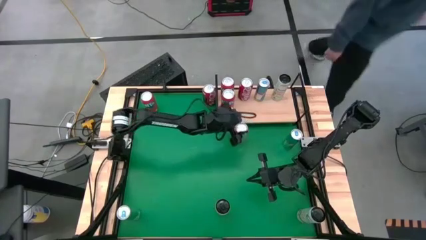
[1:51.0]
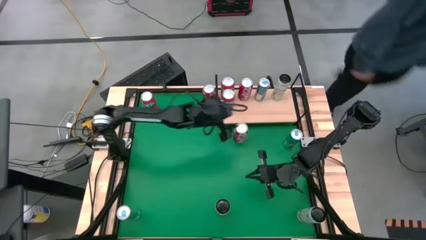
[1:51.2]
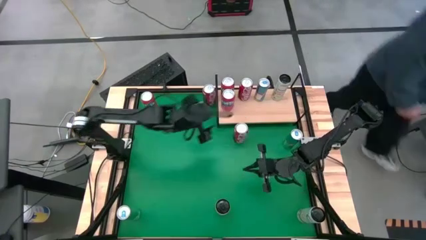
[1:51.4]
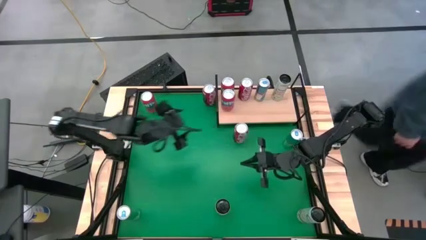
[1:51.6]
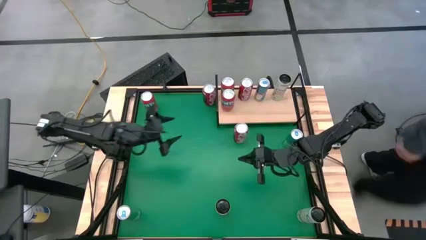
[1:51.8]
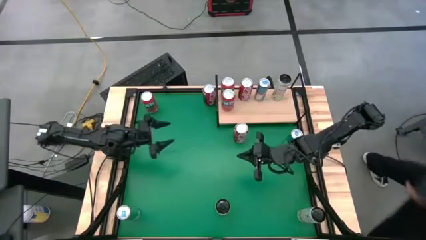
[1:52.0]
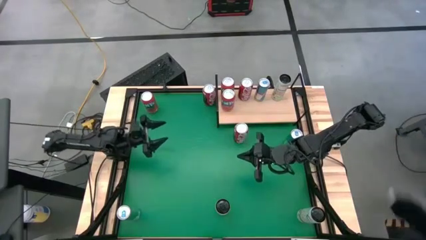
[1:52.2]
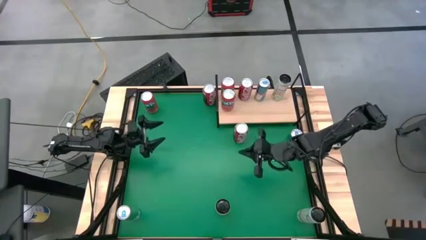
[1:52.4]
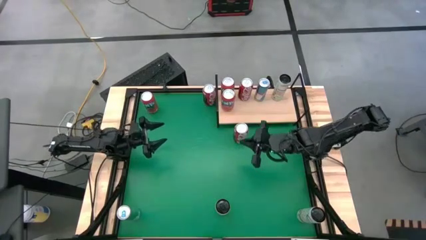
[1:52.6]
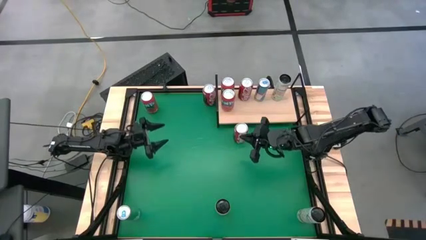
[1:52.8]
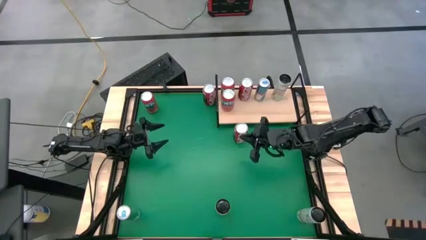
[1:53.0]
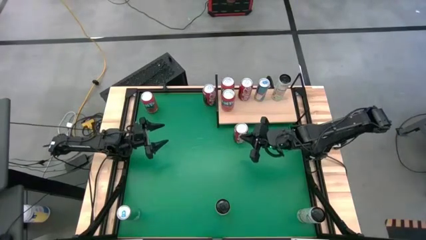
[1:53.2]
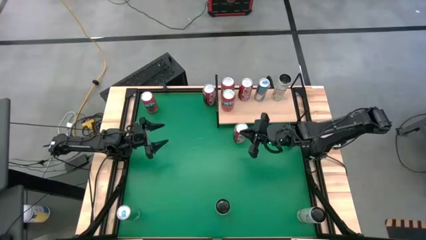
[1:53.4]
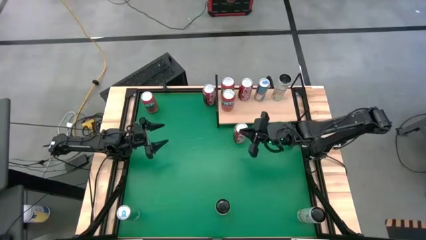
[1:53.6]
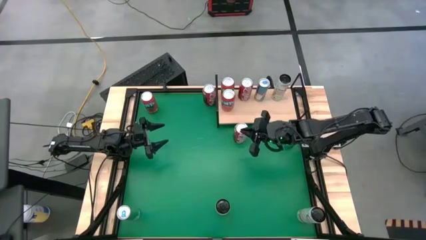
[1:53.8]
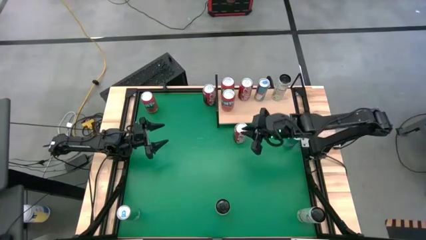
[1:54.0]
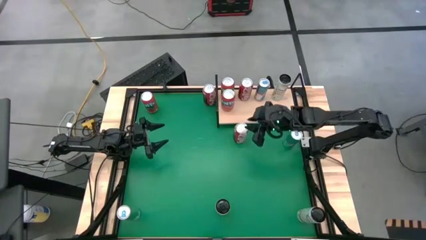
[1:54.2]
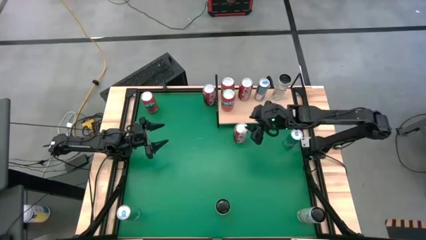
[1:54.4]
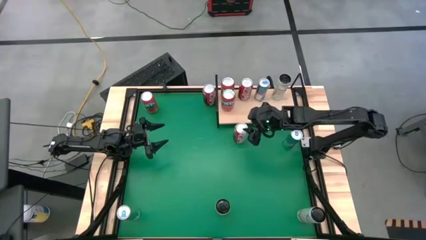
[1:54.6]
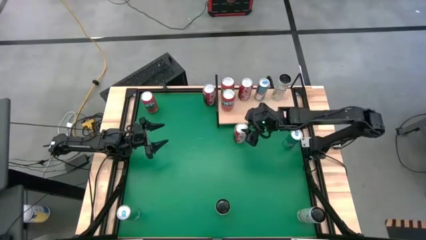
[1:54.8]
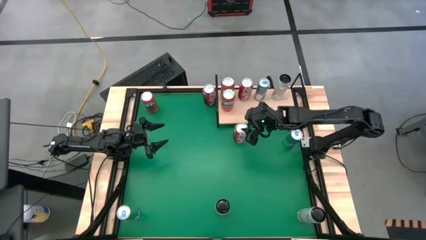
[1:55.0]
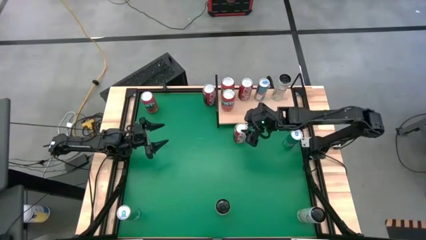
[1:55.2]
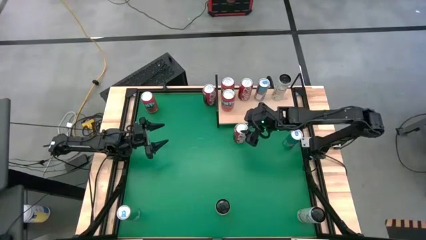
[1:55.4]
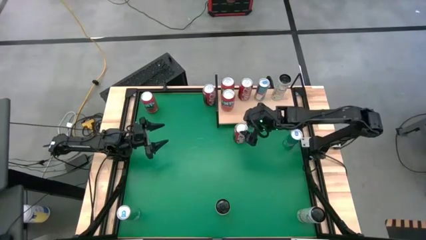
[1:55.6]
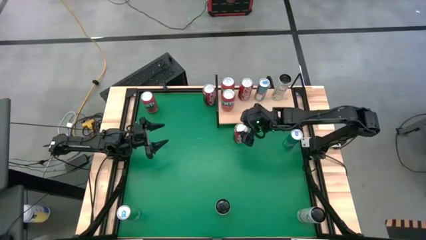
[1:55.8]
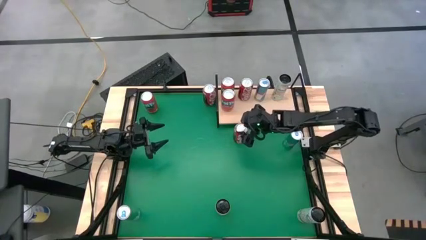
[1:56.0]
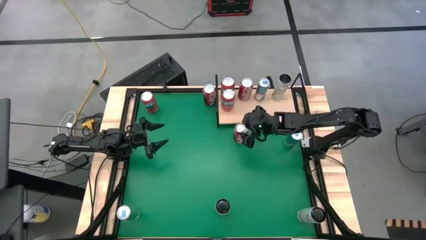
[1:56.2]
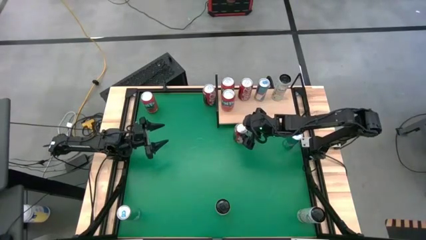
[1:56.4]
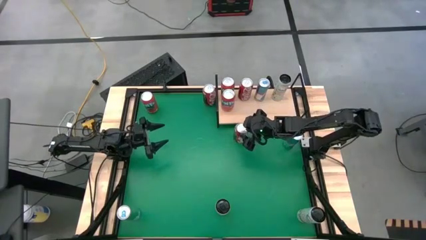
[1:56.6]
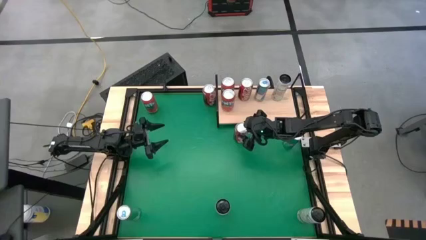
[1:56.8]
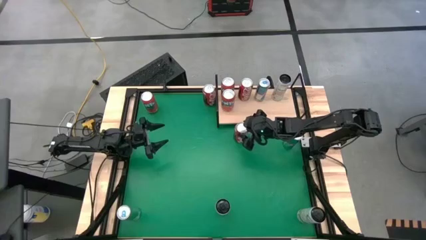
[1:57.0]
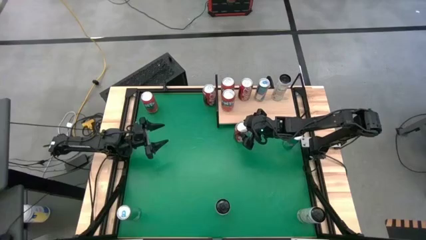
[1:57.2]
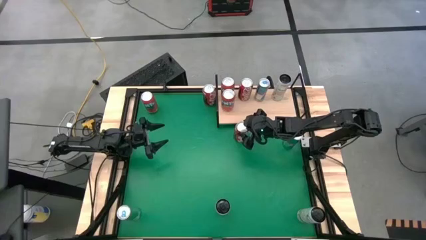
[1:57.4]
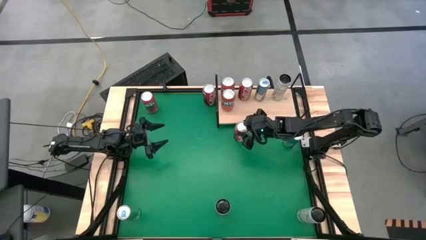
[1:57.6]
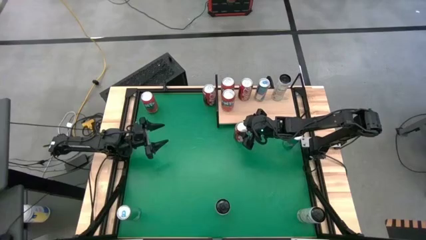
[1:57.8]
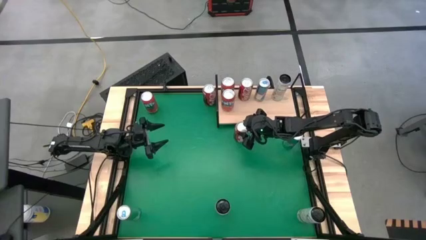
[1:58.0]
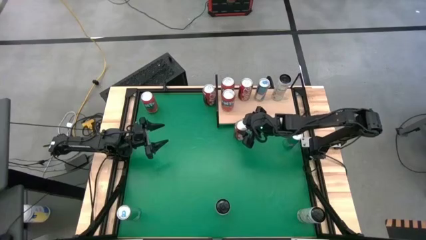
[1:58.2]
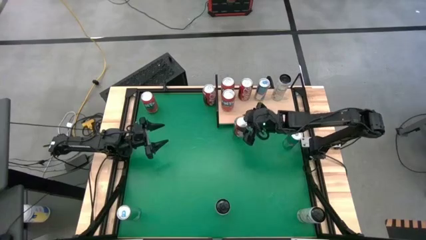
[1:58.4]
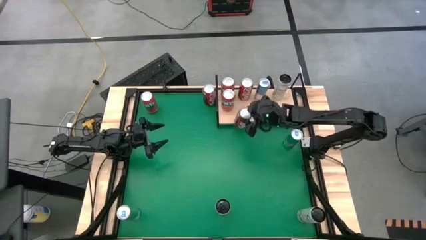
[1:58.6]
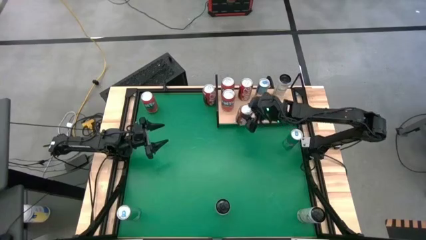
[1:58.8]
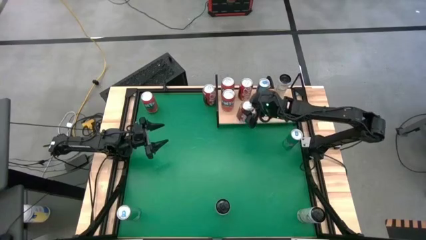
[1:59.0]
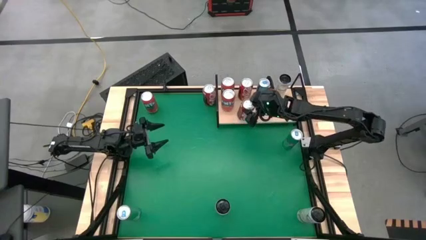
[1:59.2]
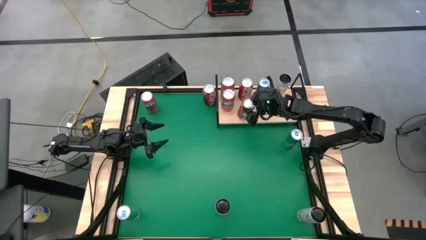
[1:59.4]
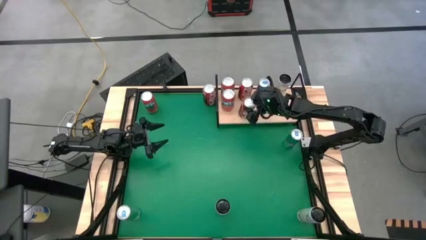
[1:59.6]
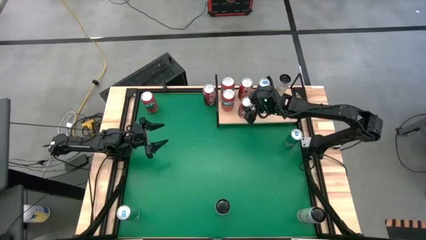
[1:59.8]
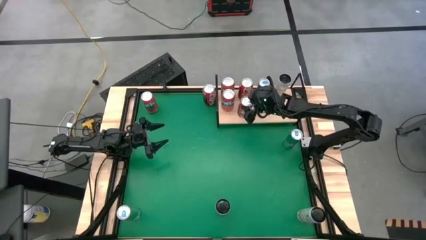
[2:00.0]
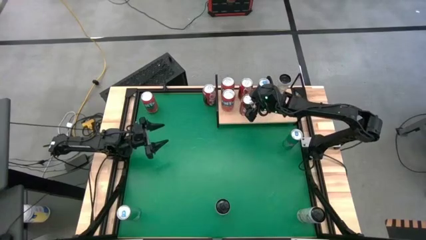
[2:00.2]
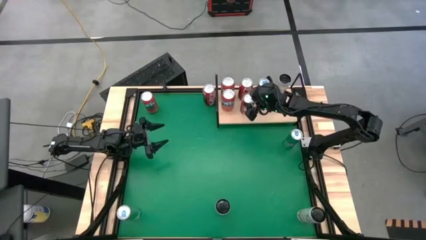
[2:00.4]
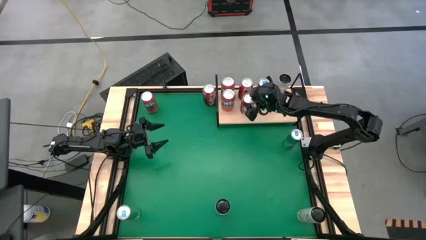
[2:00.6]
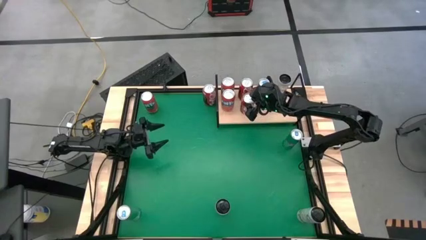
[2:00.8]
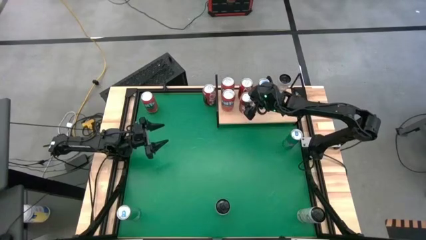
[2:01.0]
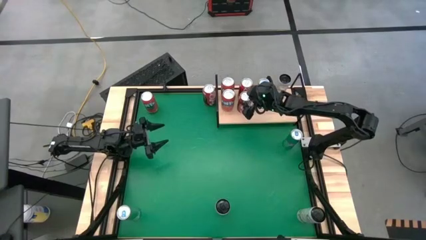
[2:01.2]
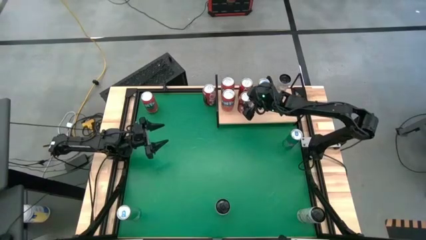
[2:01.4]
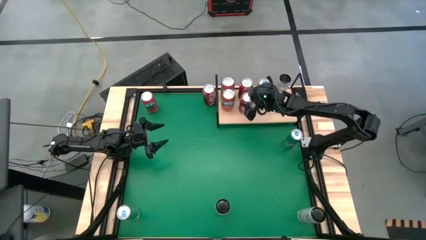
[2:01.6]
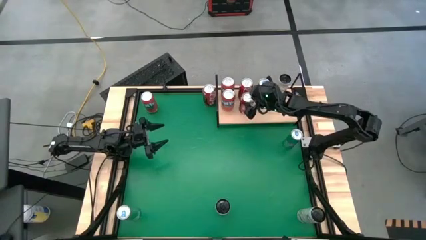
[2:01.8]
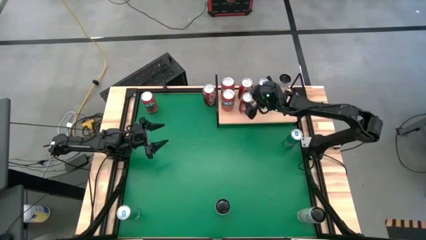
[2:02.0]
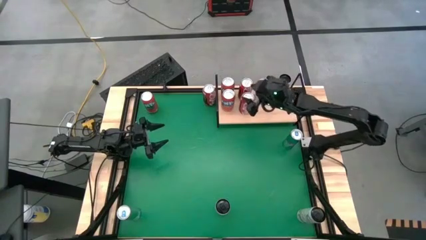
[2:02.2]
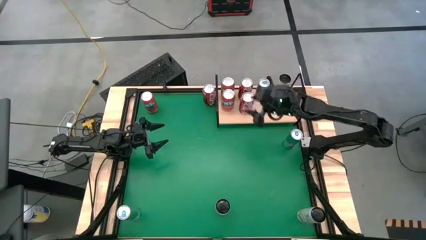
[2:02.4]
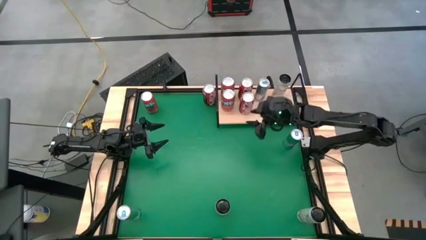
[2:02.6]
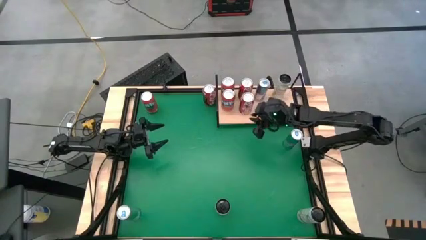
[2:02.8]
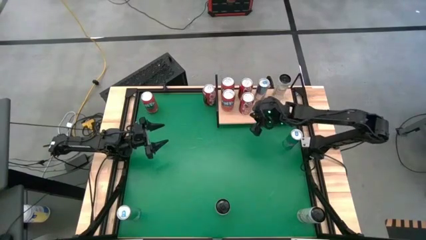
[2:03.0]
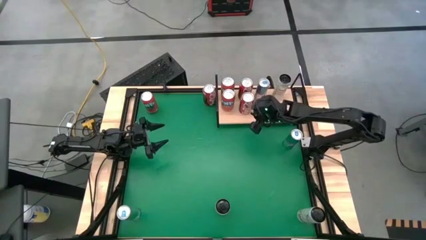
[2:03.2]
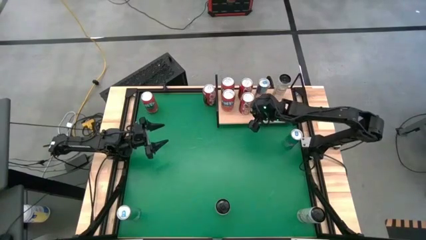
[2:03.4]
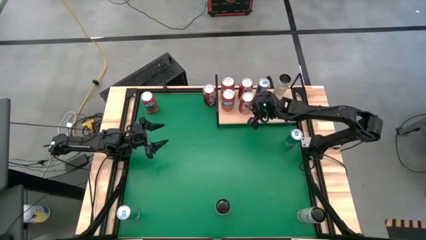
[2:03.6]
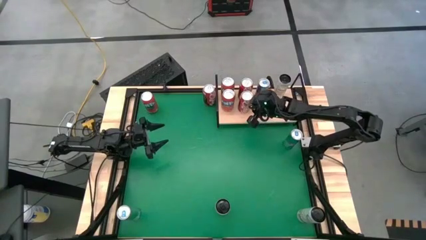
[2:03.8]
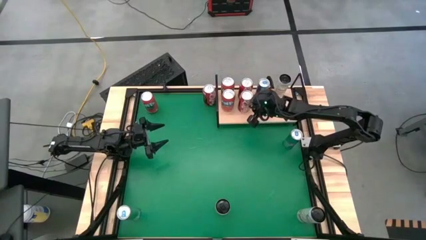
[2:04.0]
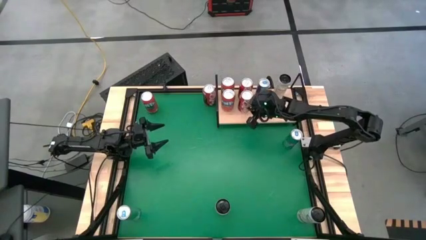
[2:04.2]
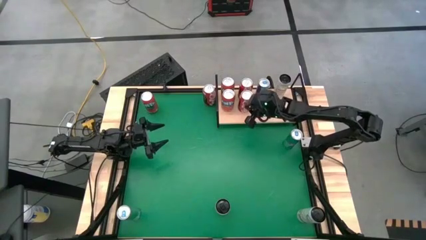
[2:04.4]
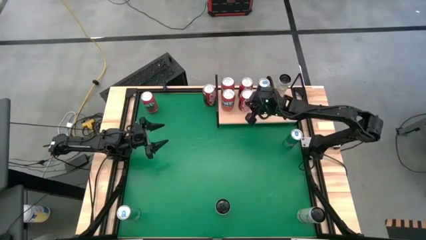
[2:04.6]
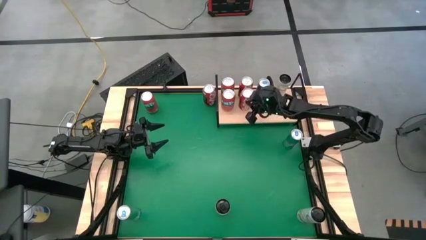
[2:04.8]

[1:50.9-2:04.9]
Task: Place canned beverage on shelf
Put the bottom red white soda can on the shelf aligned with the other red white soda can
